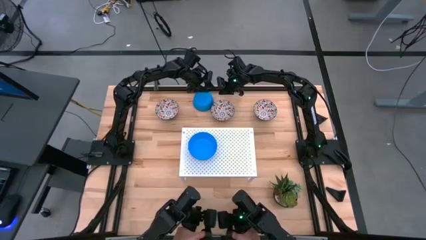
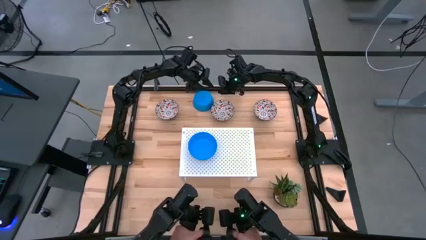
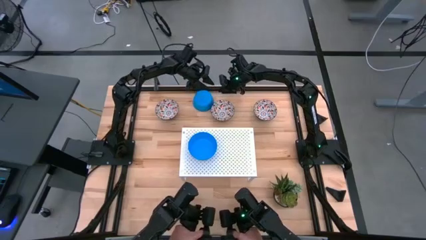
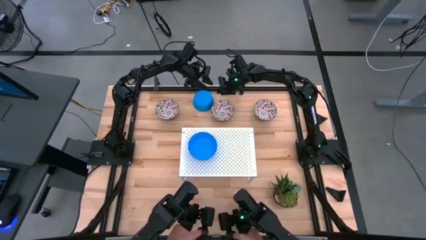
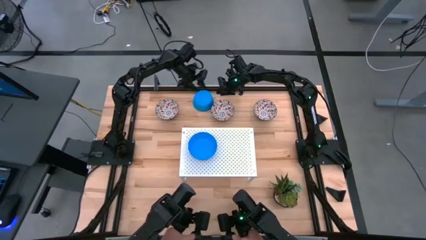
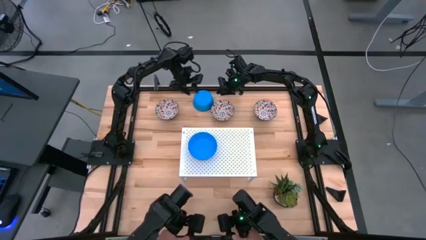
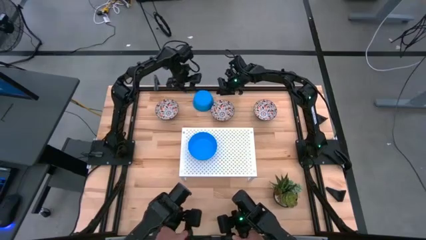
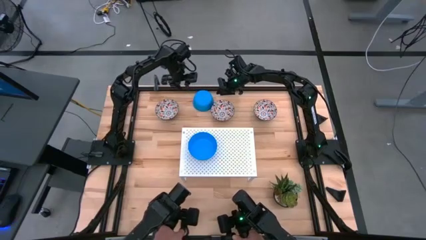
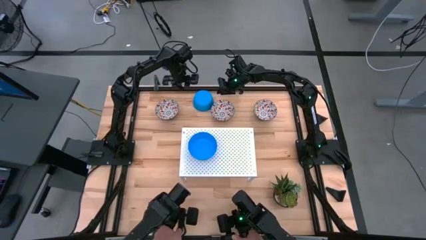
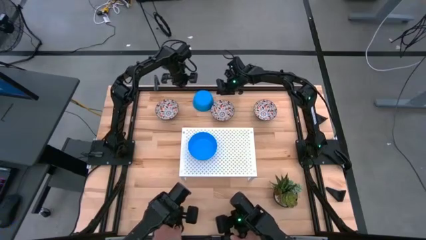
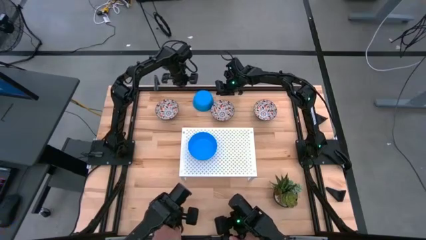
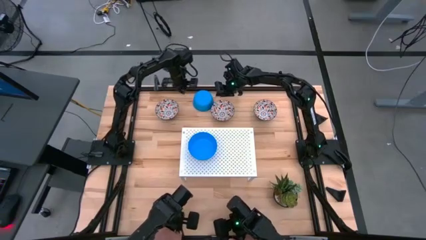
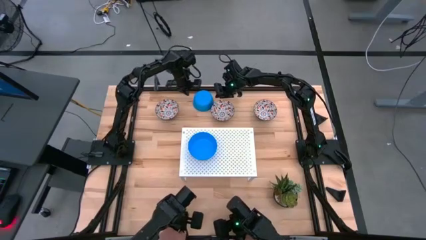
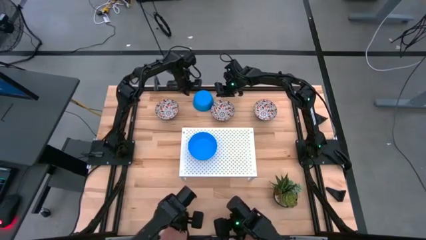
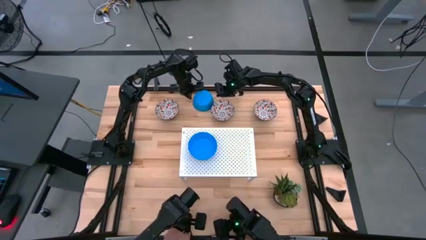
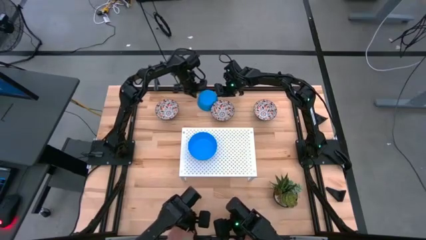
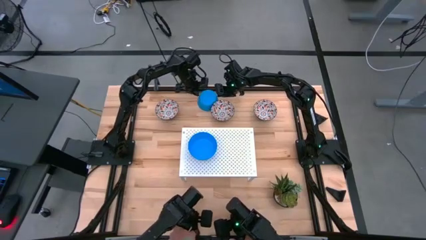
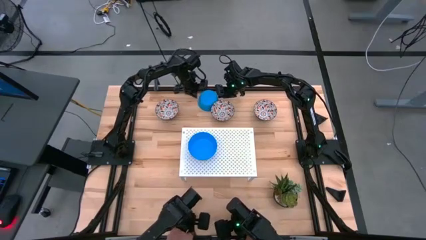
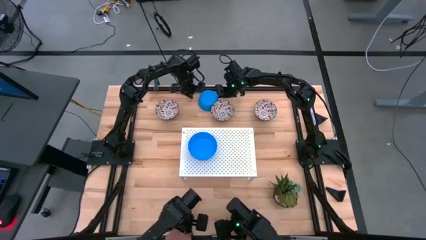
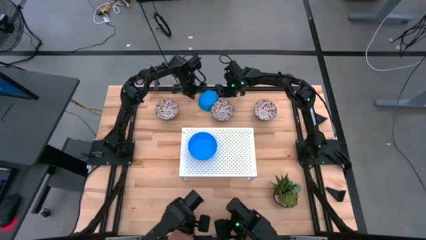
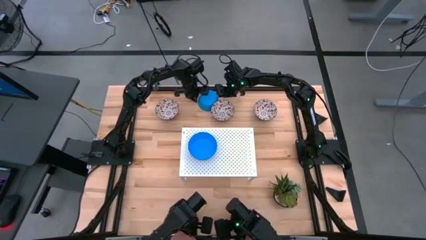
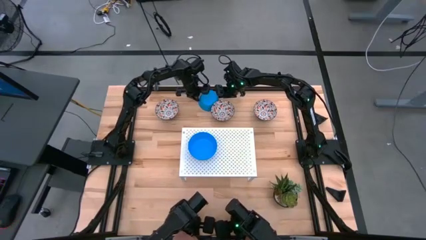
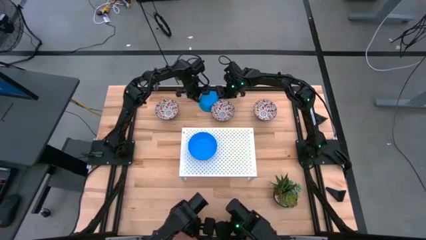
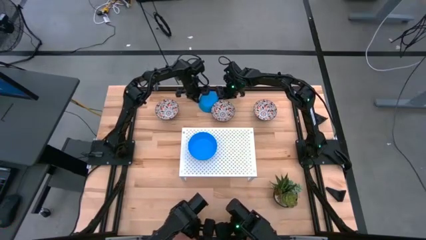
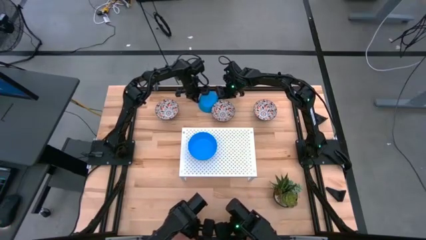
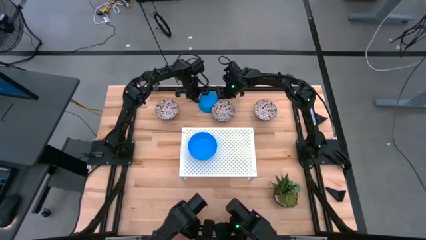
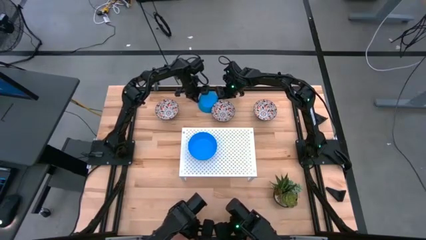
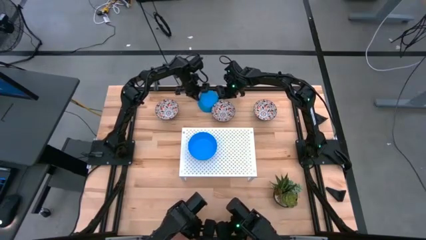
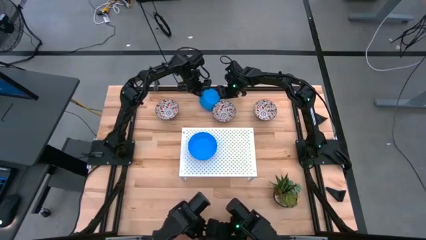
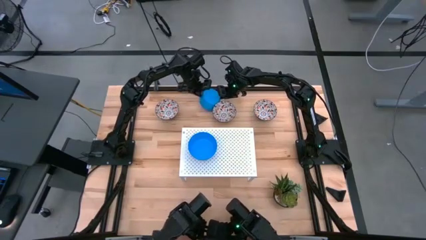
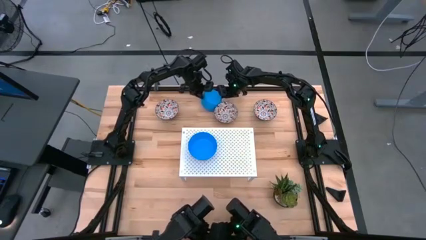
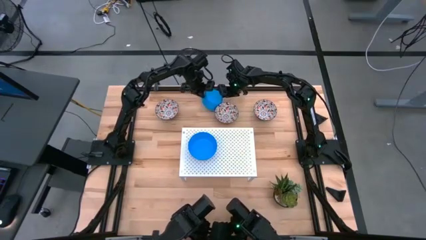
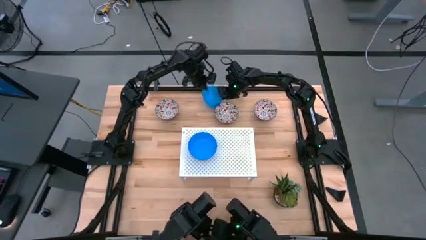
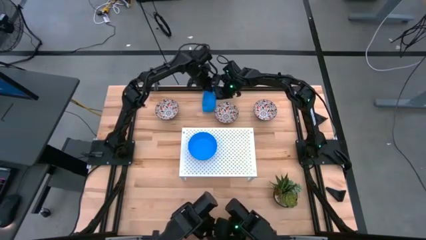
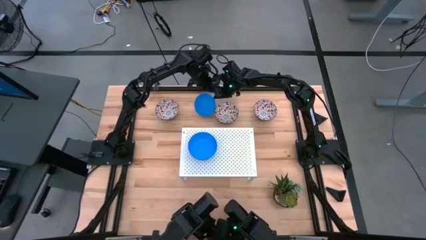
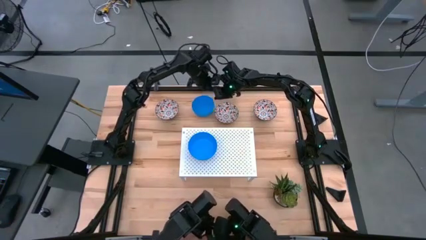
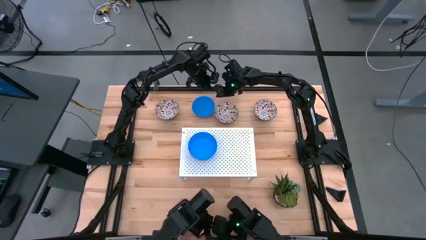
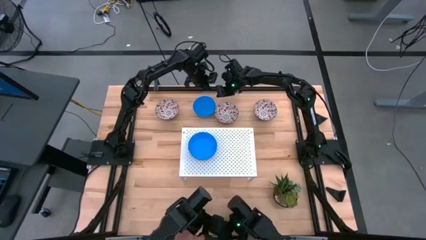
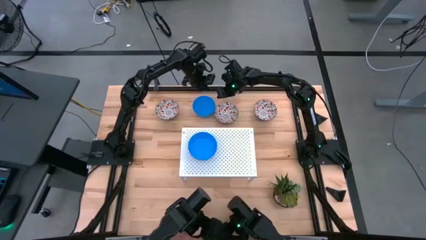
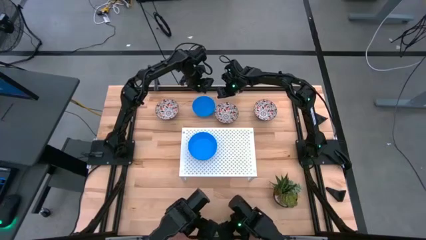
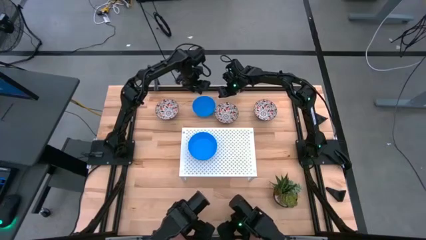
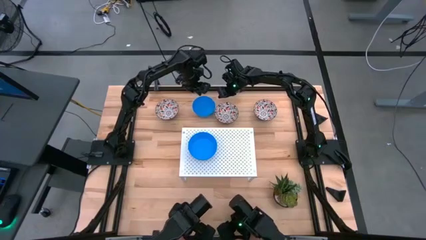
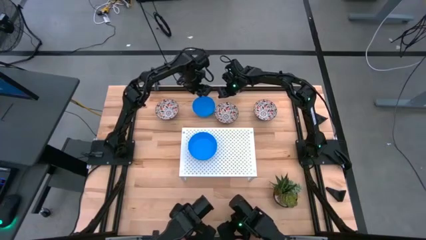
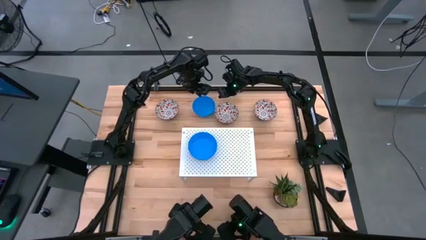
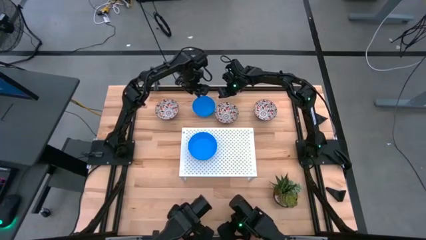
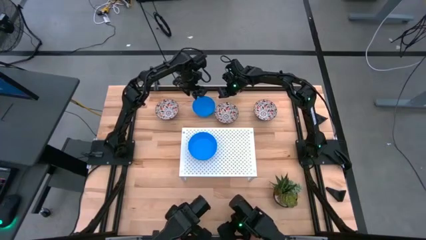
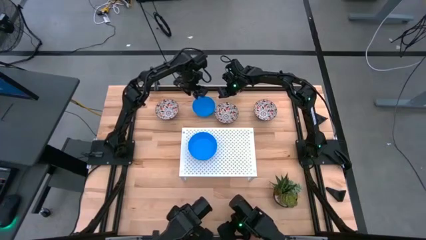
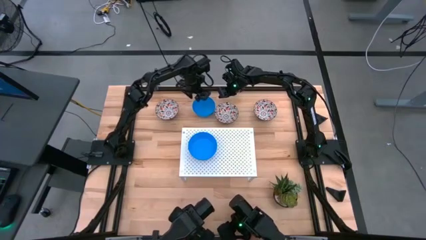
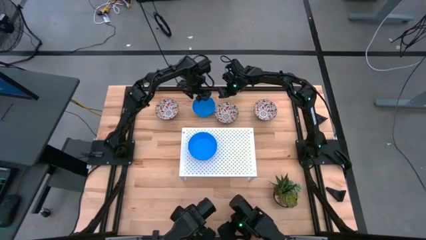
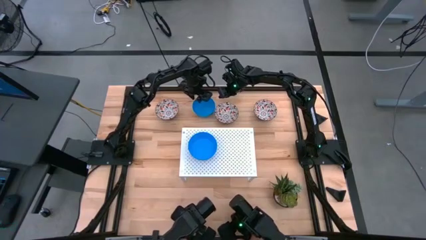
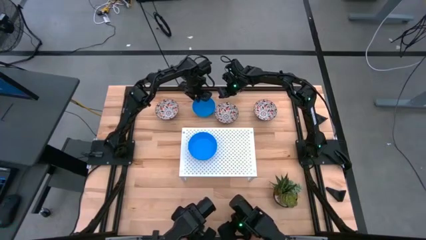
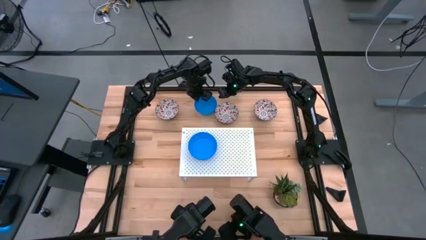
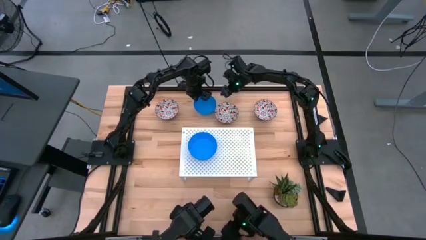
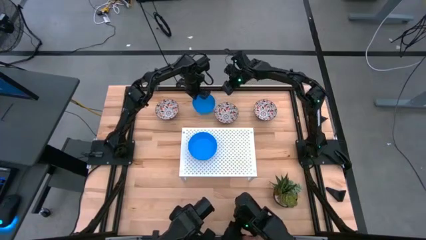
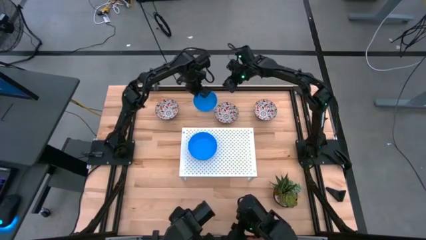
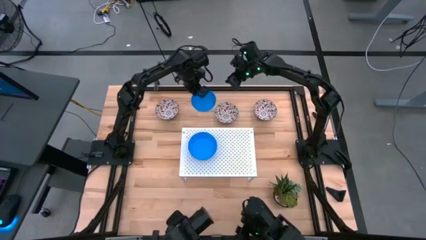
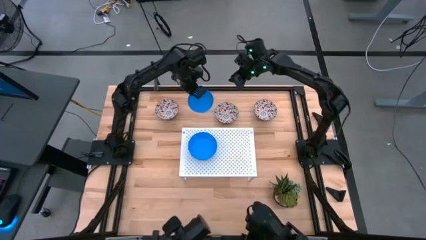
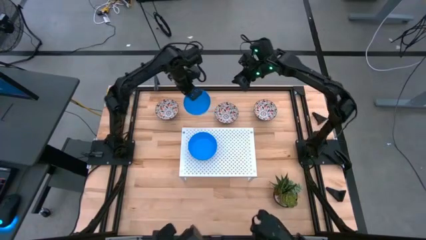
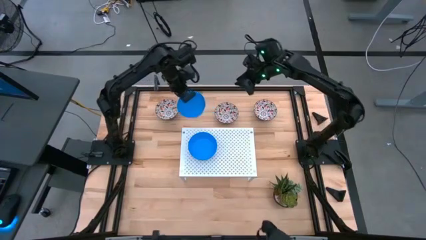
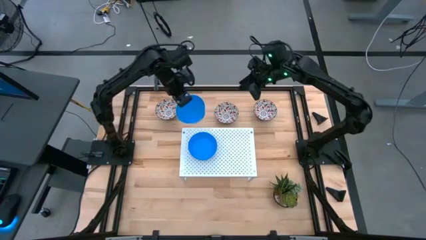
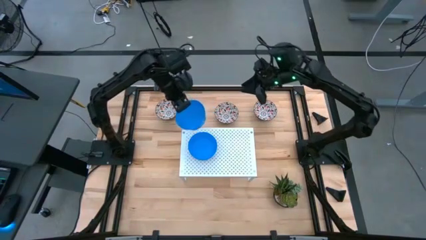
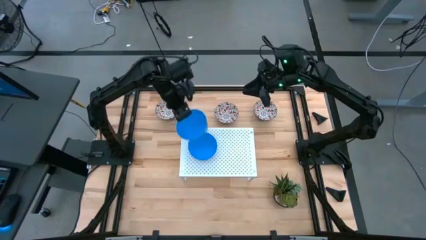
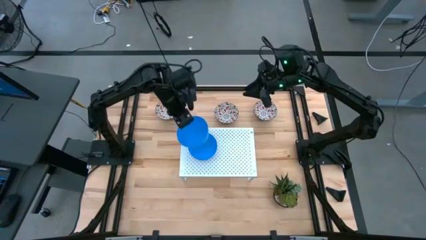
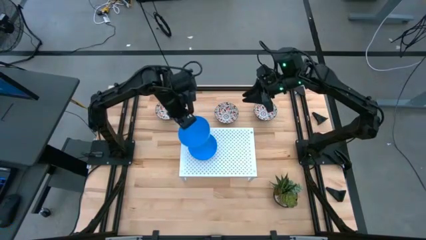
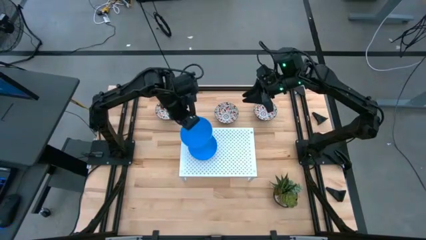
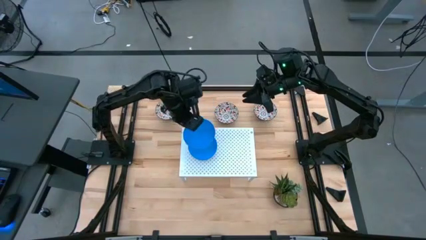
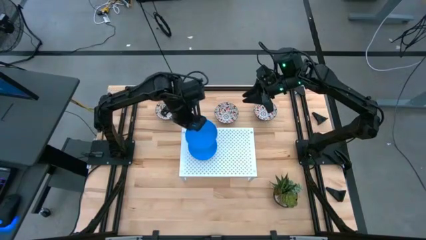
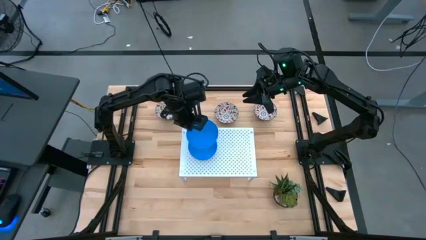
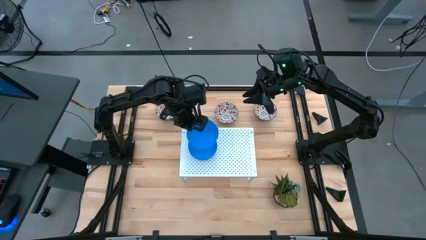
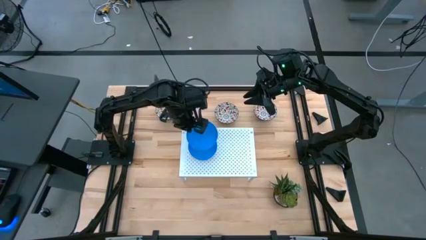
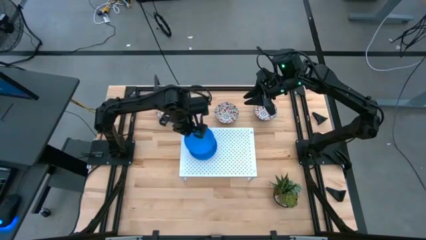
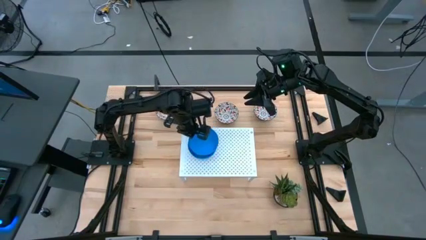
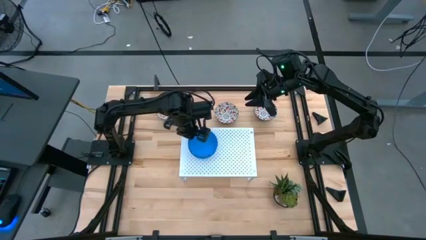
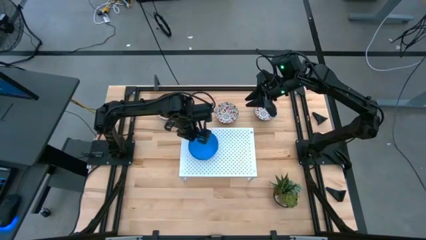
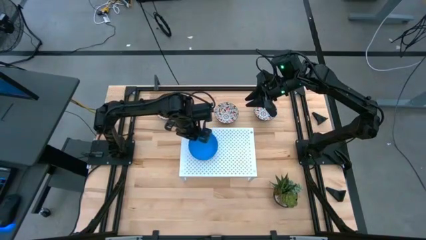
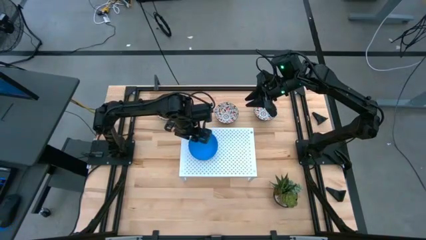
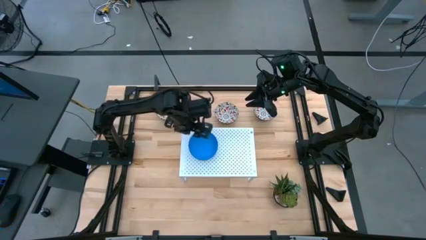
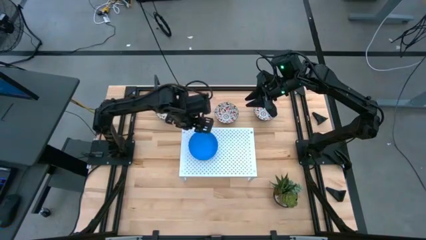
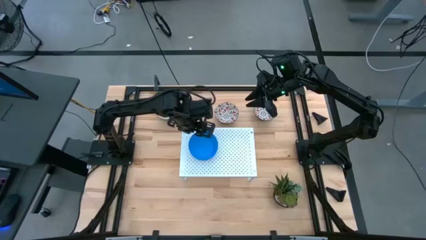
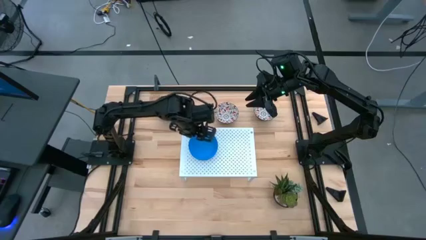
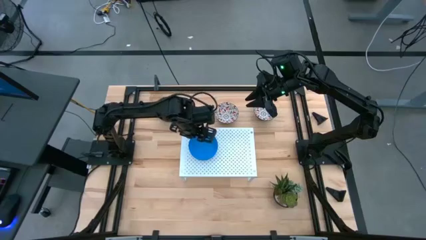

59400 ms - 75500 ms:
Task: Pick & Place Mini bowls
Stack the blue bowl on top of the blue bowl on the shelf
